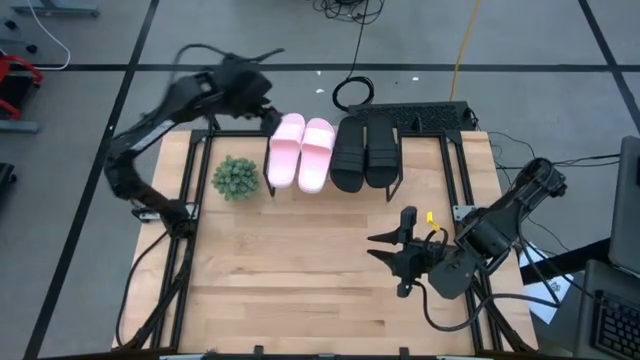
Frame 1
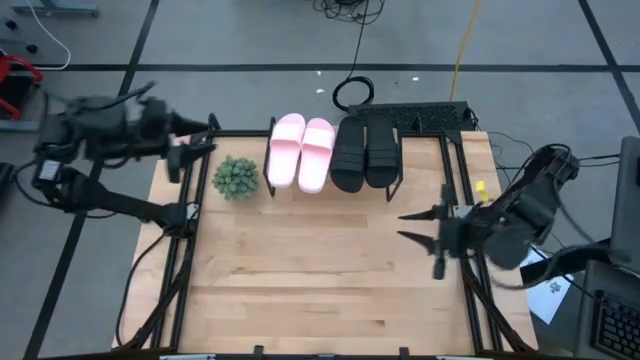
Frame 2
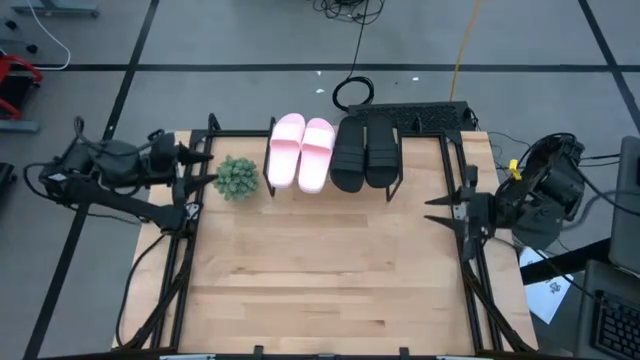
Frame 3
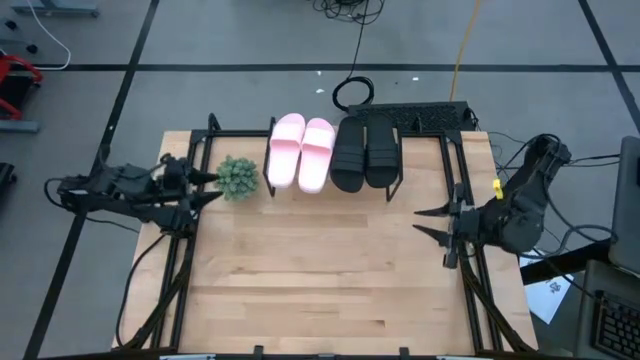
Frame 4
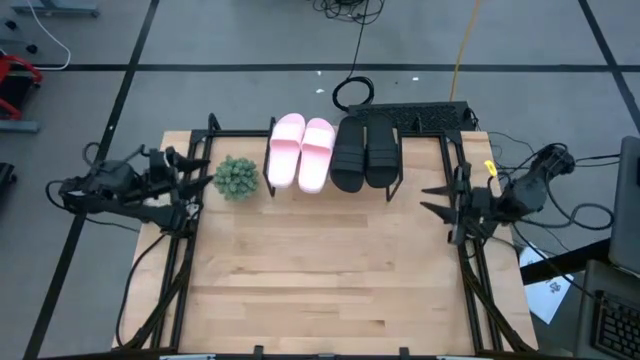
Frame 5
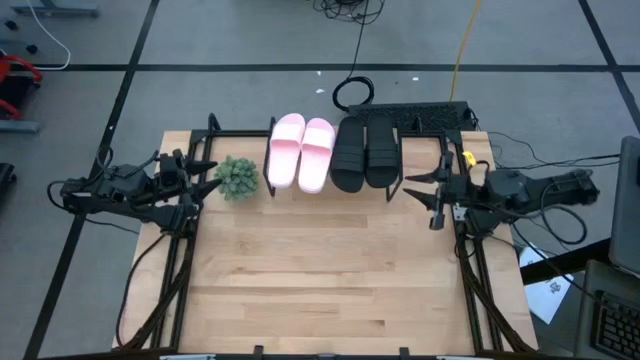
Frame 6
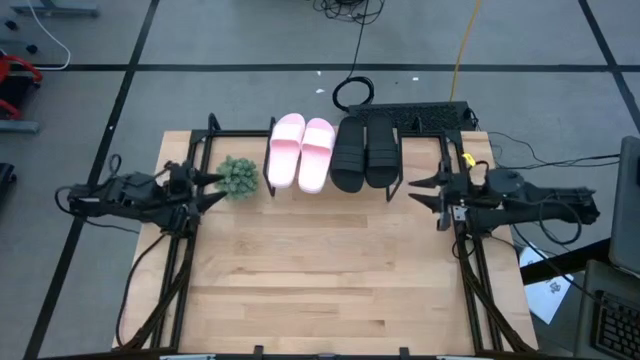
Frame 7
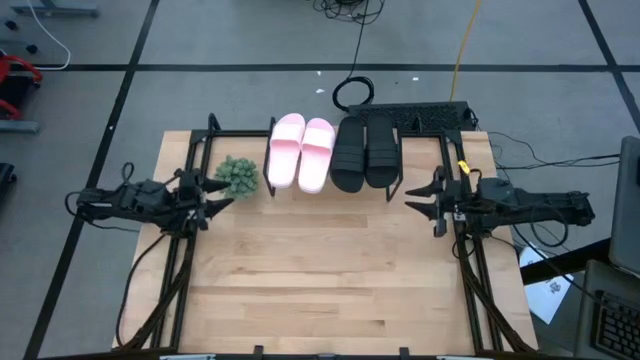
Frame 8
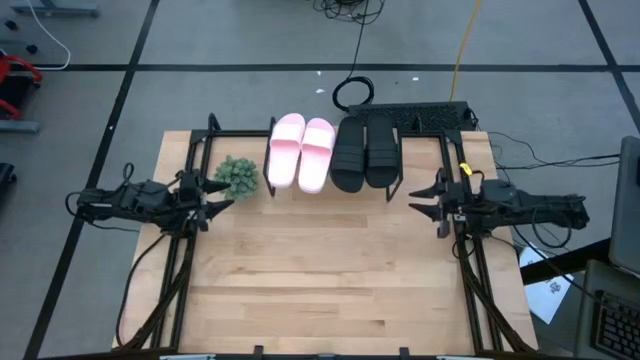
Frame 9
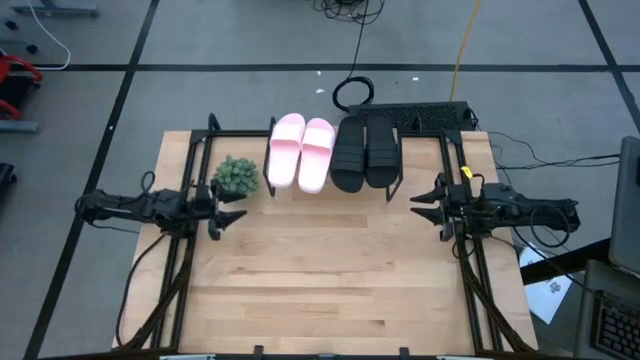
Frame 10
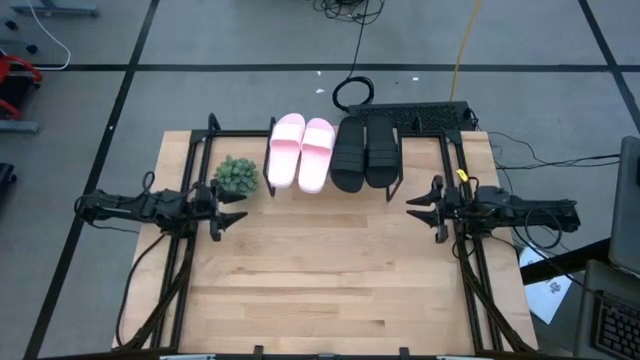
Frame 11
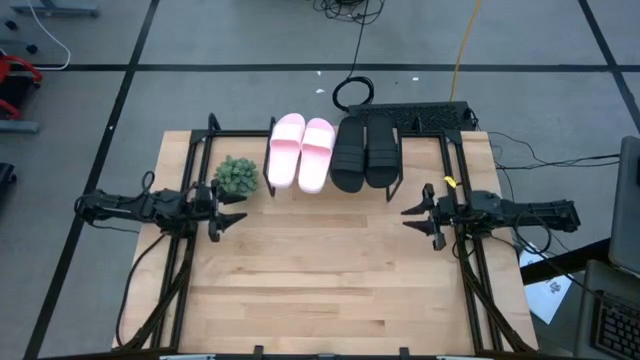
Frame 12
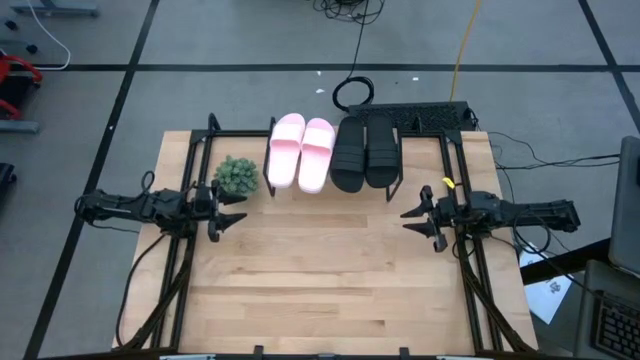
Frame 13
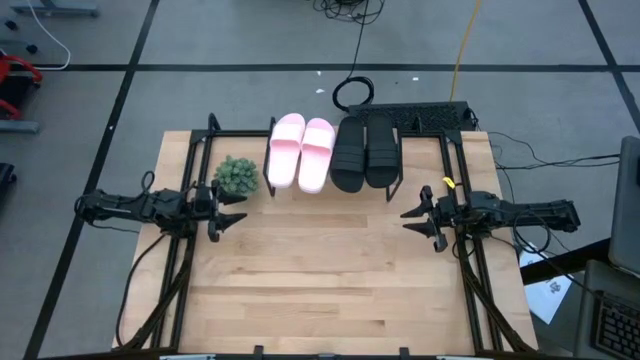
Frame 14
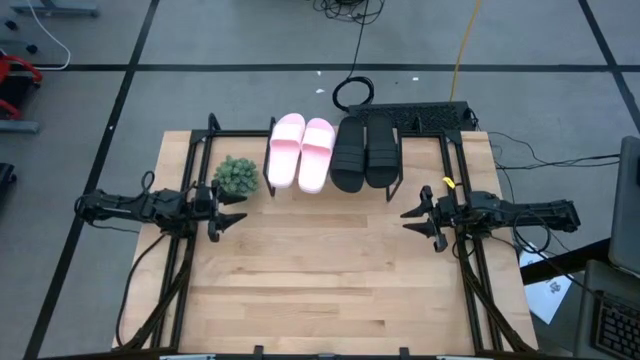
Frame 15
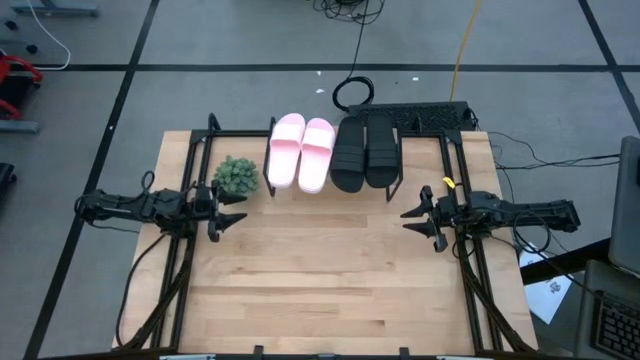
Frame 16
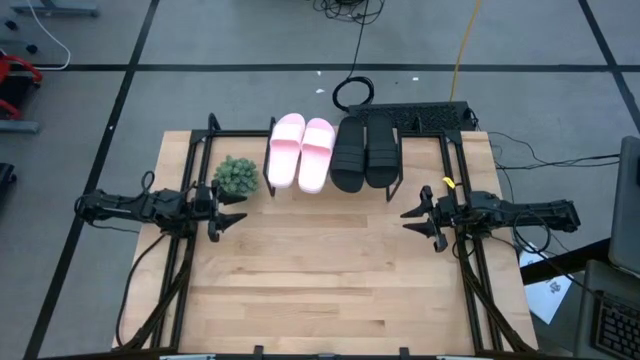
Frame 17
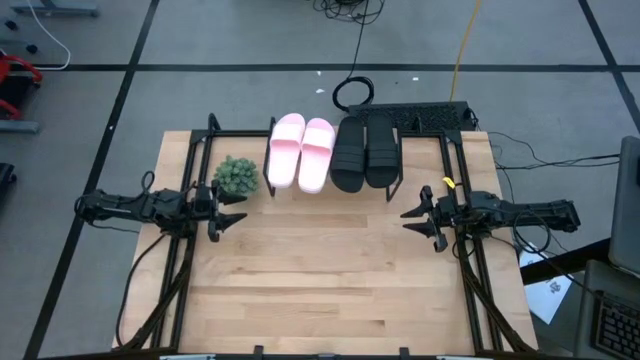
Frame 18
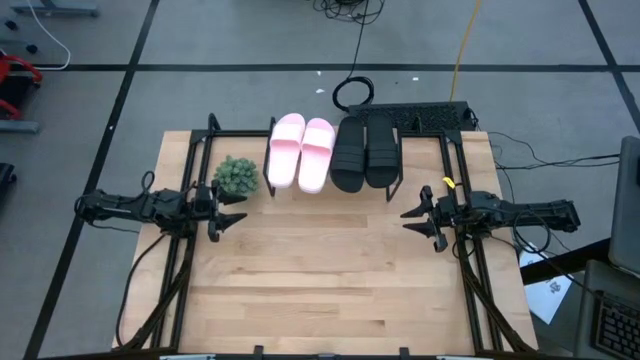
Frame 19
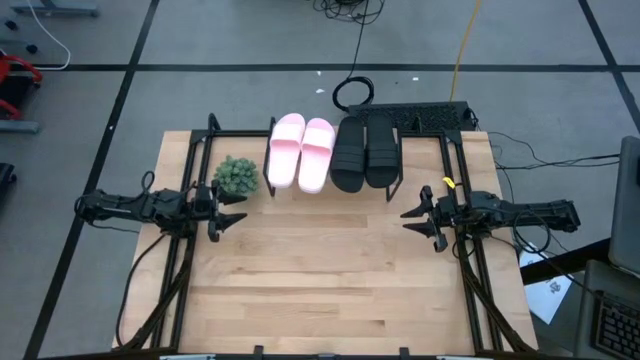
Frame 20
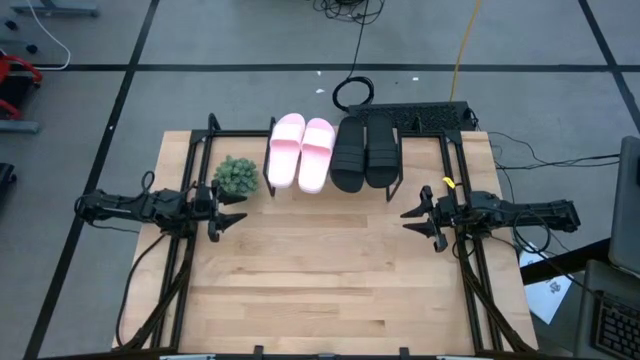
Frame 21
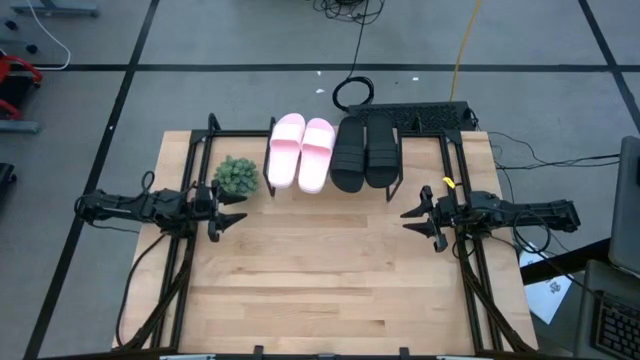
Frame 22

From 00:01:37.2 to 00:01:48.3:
Task: Pick and place slides into the shelf
Return to Home Position

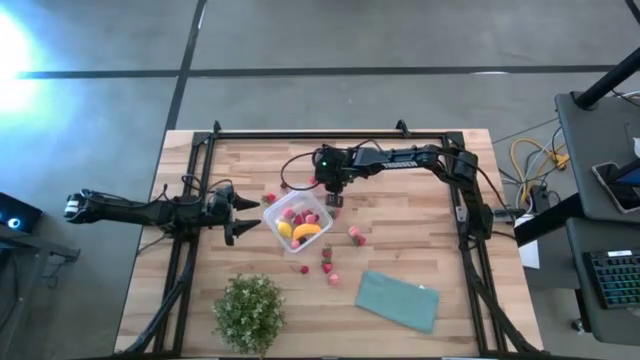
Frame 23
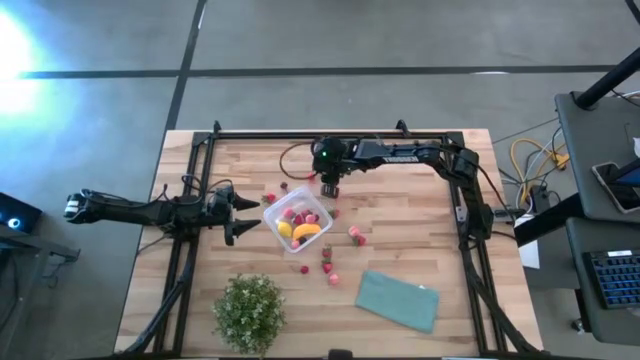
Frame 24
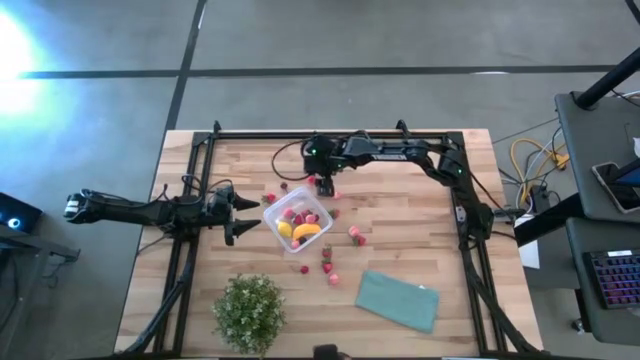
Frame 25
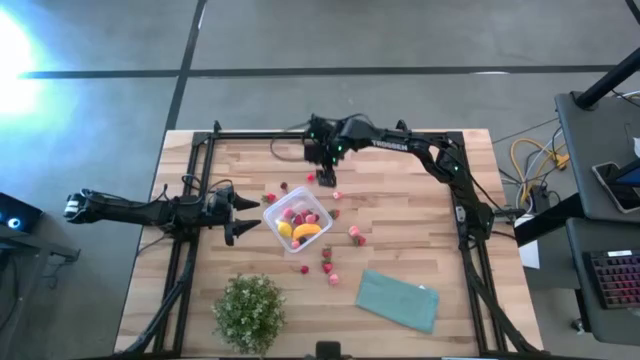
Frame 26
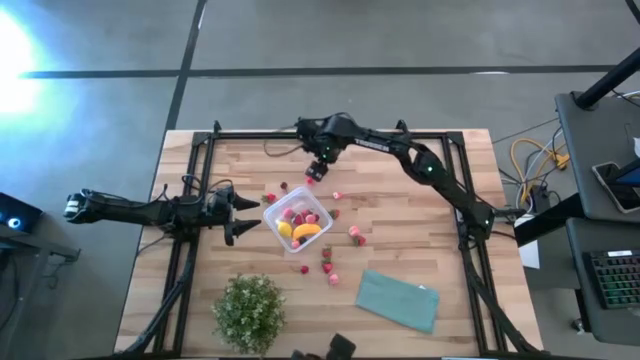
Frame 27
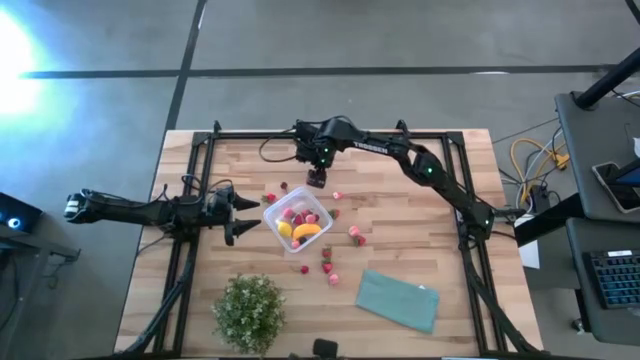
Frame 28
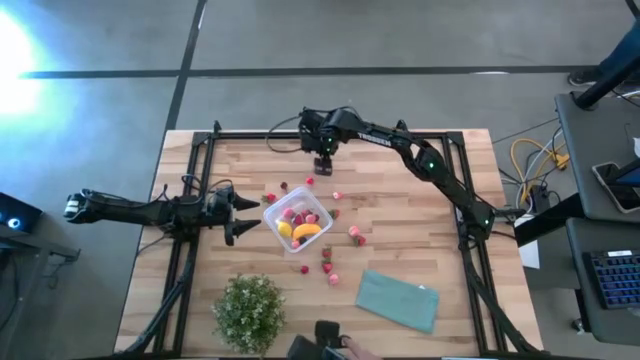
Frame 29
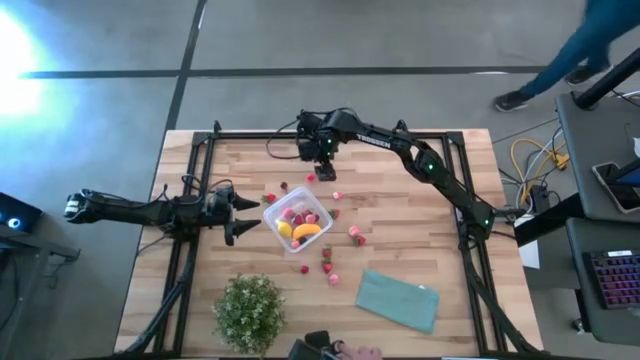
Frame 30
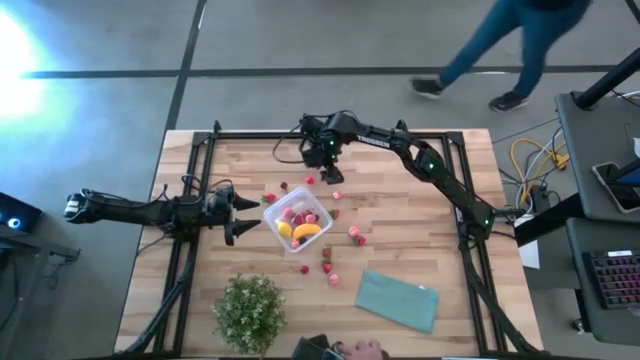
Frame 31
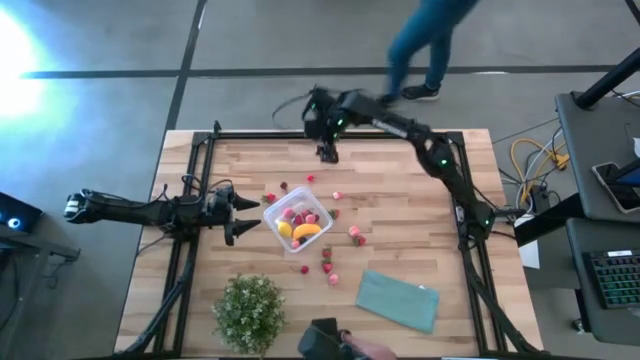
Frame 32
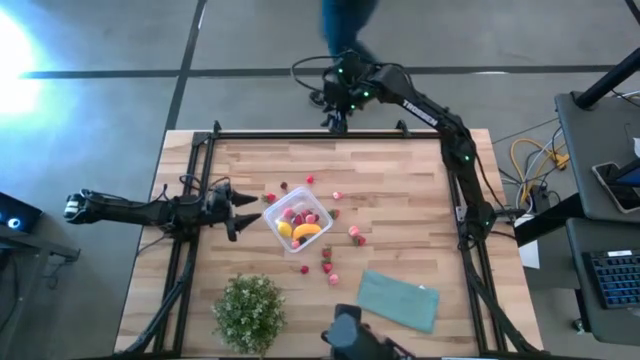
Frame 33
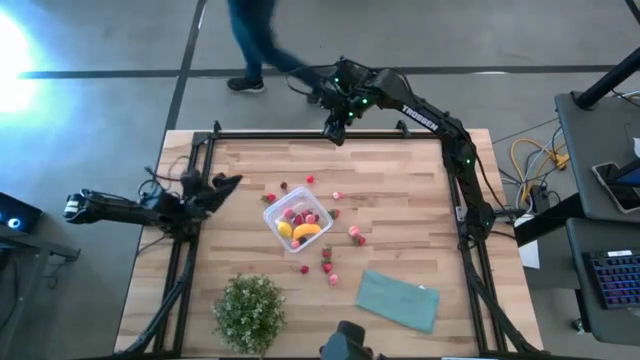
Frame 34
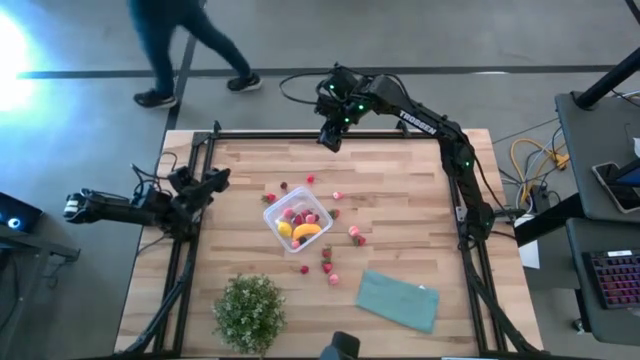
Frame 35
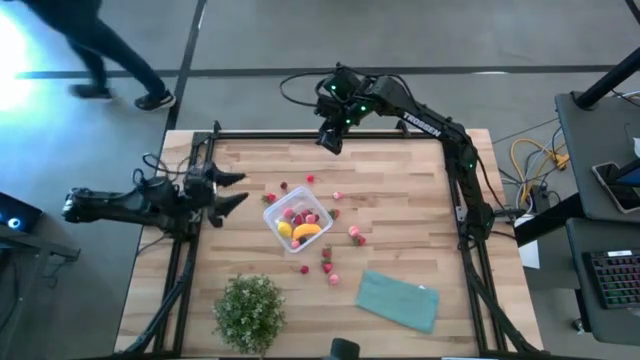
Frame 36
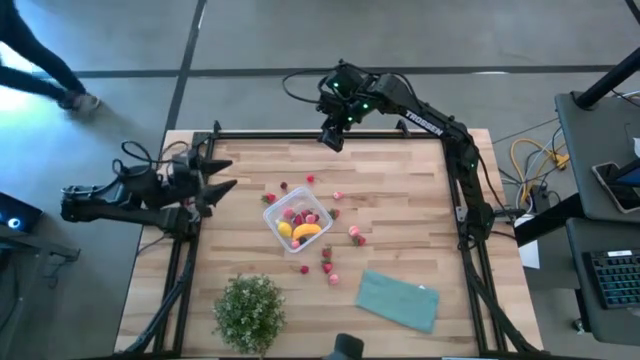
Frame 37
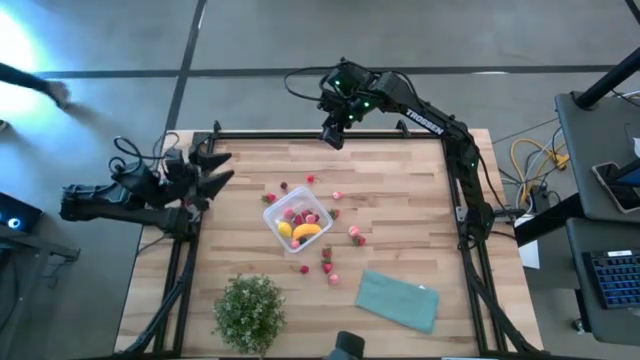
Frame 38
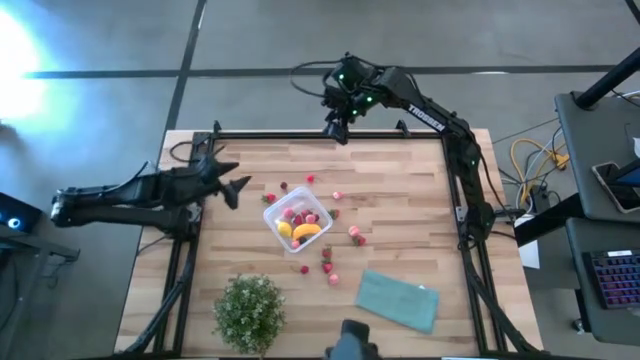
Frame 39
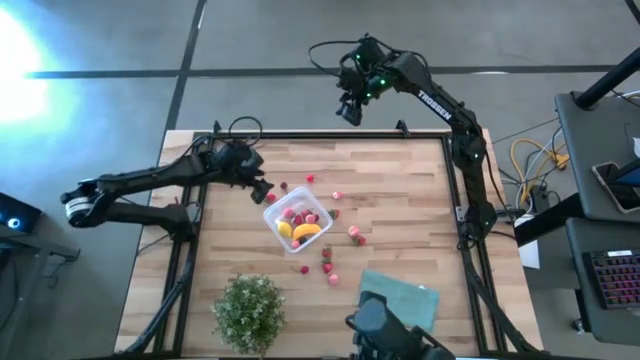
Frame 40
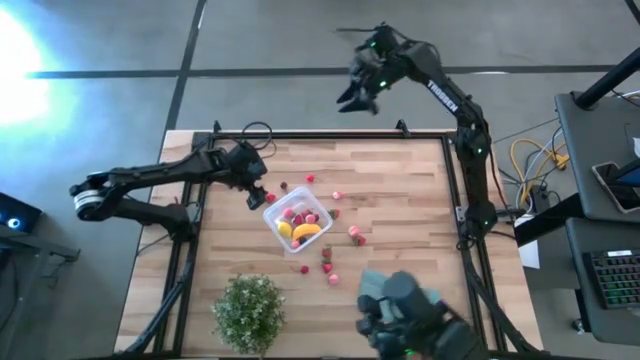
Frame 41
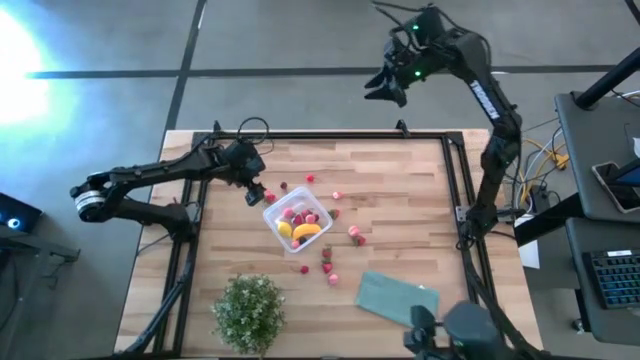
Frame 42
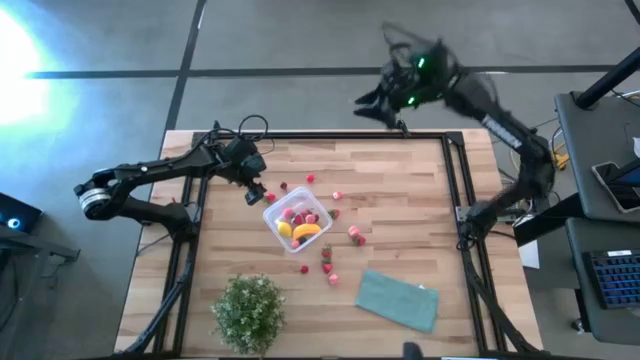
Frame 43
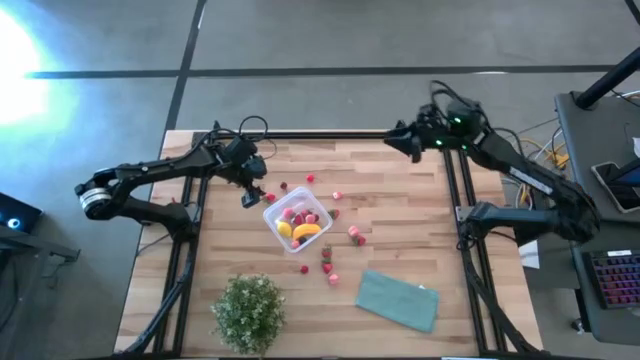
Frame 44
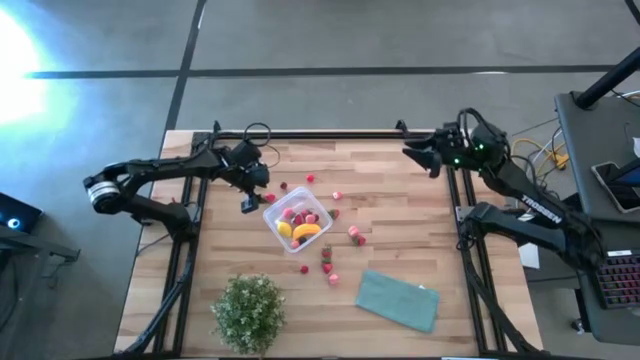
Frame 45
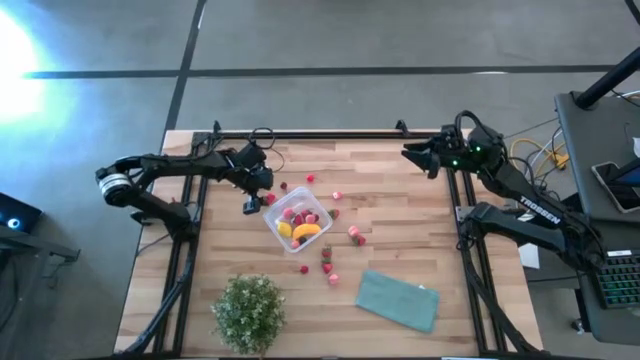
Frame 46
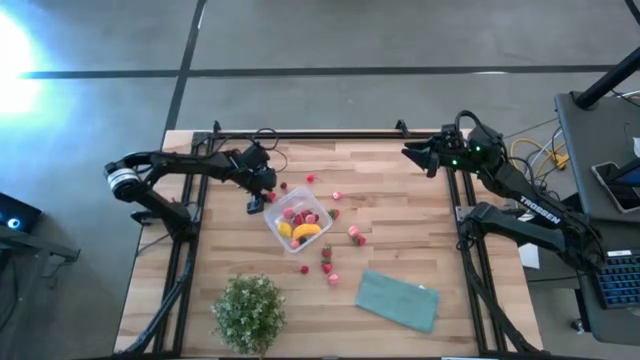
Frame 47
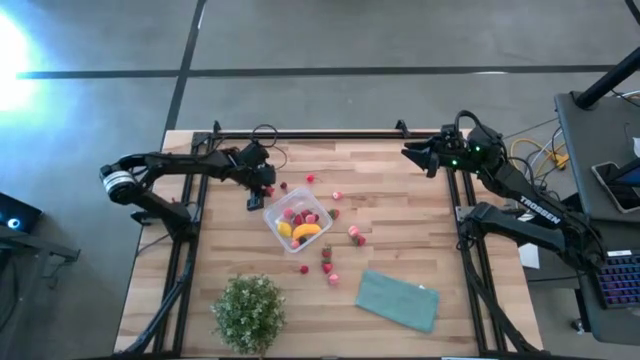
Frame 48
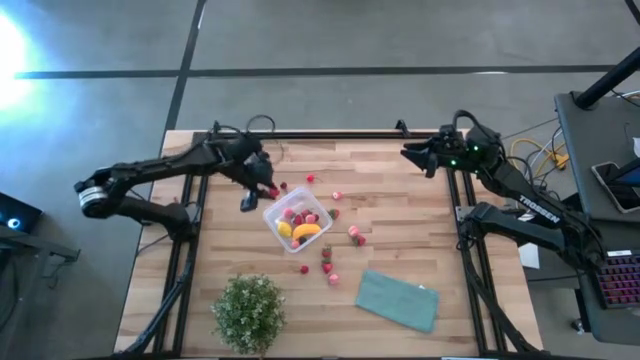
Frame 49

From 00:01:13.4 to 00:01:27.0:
Task: Pick and placing Produce into tupperware
Put the red strawberry into the transparent bin
